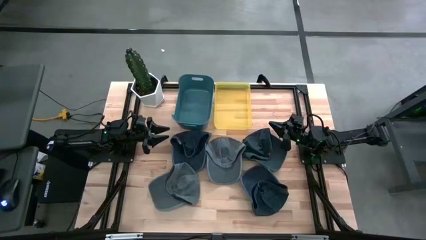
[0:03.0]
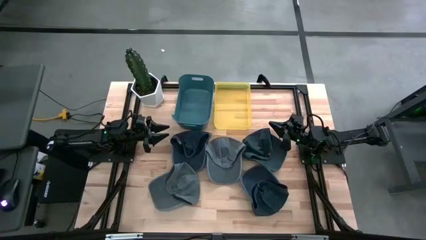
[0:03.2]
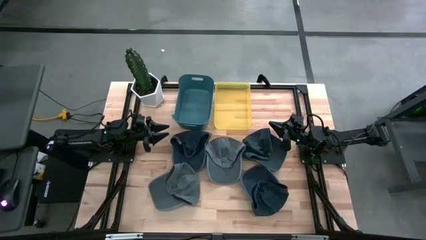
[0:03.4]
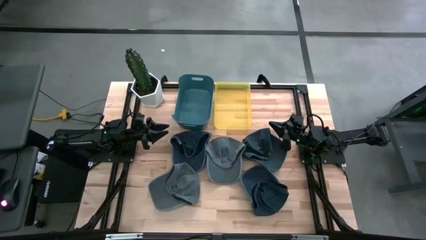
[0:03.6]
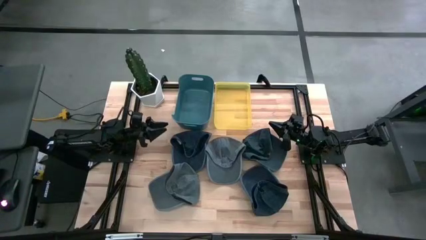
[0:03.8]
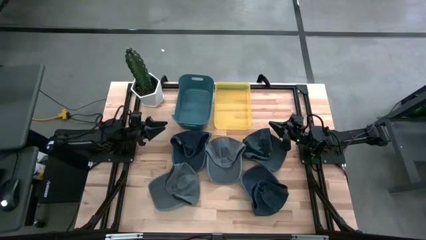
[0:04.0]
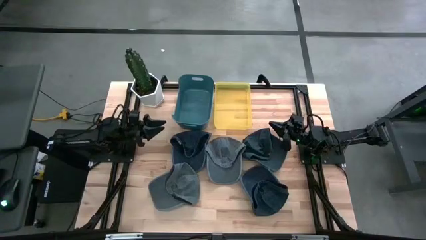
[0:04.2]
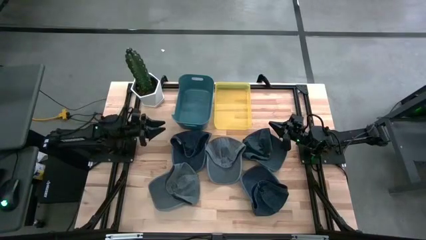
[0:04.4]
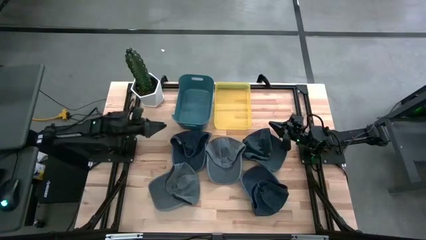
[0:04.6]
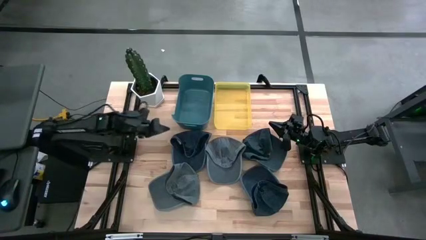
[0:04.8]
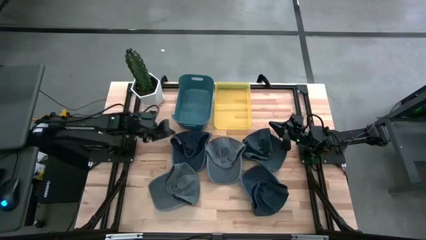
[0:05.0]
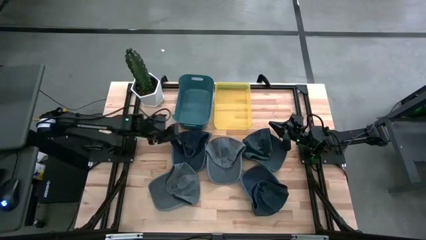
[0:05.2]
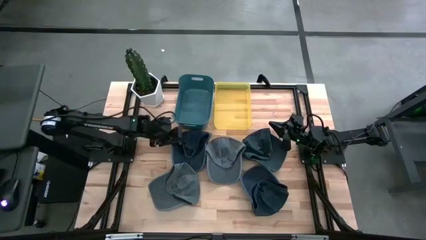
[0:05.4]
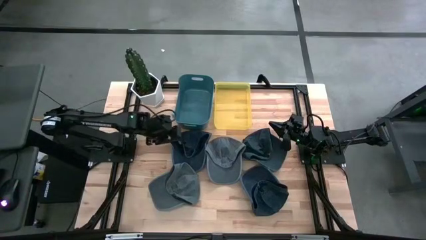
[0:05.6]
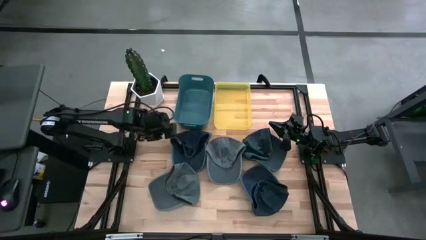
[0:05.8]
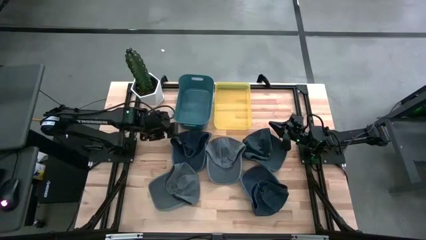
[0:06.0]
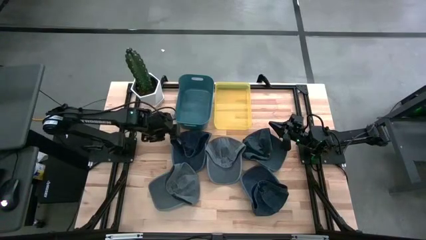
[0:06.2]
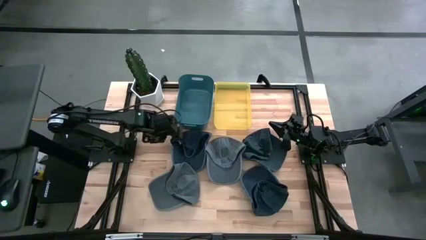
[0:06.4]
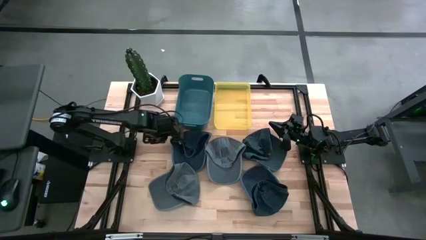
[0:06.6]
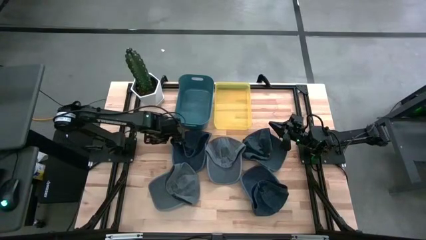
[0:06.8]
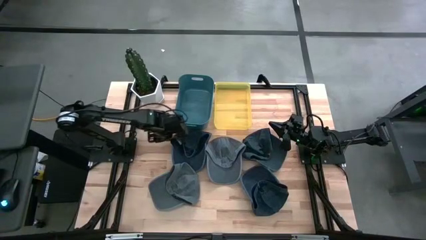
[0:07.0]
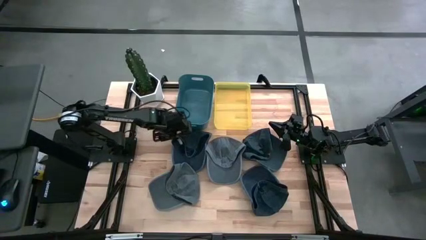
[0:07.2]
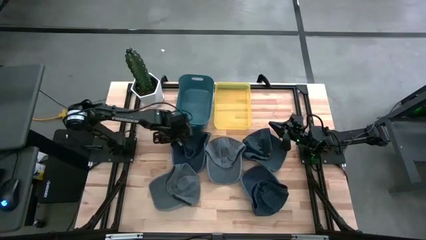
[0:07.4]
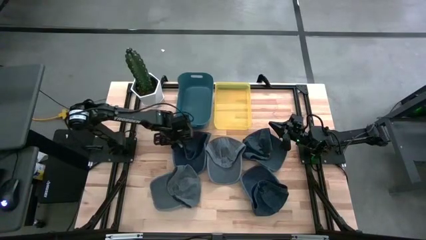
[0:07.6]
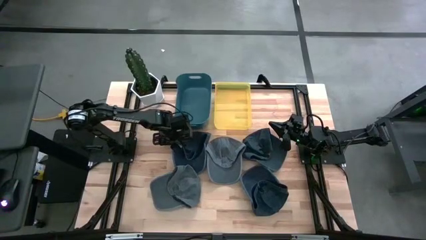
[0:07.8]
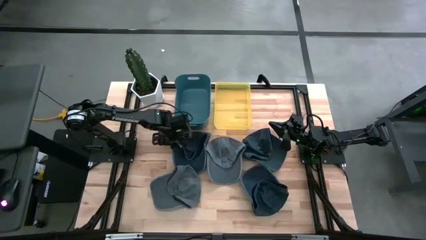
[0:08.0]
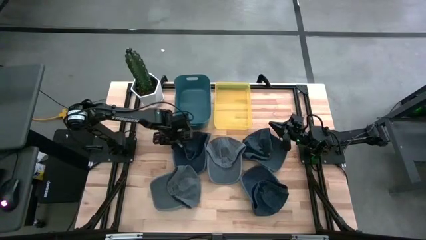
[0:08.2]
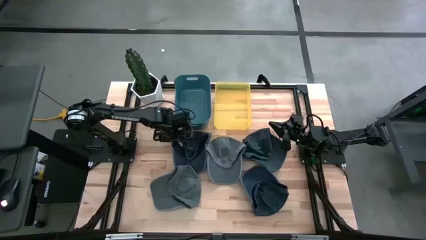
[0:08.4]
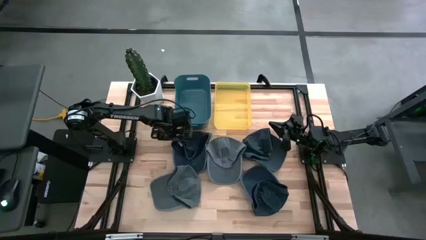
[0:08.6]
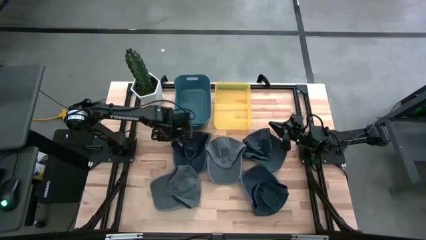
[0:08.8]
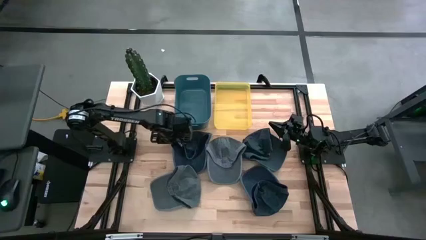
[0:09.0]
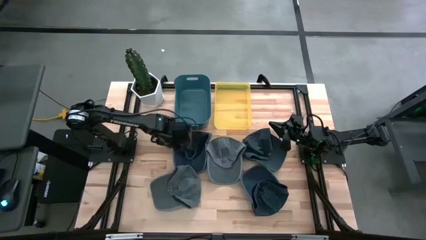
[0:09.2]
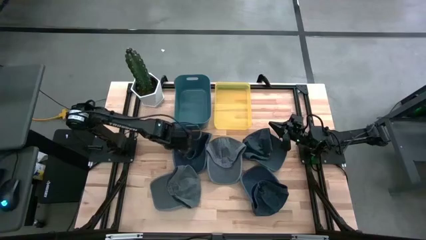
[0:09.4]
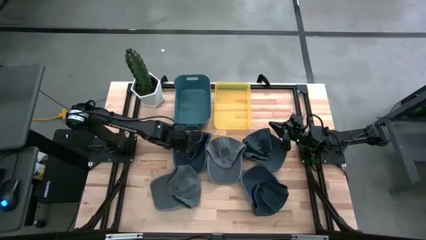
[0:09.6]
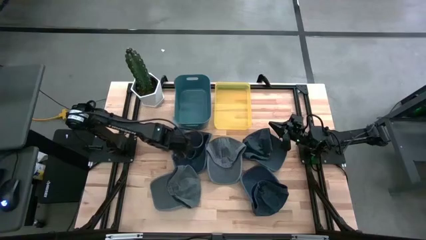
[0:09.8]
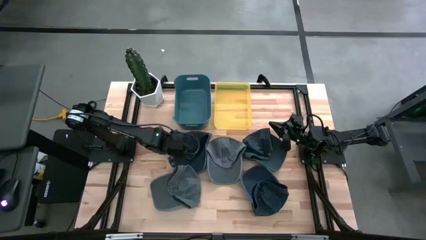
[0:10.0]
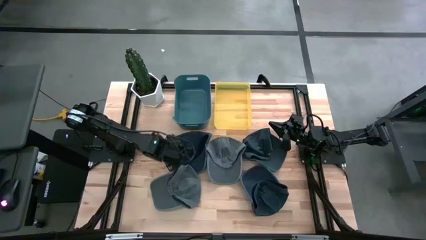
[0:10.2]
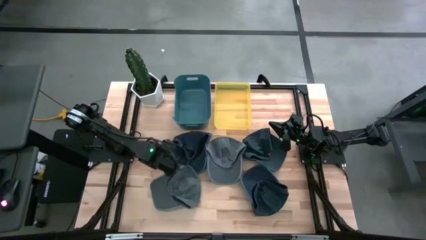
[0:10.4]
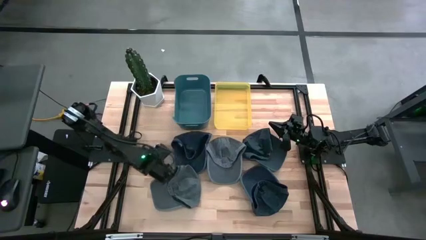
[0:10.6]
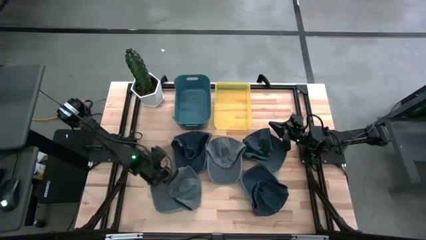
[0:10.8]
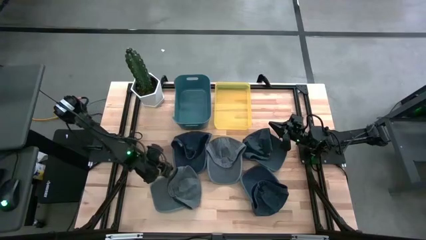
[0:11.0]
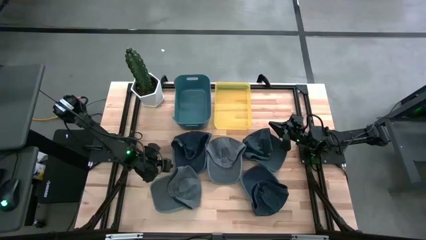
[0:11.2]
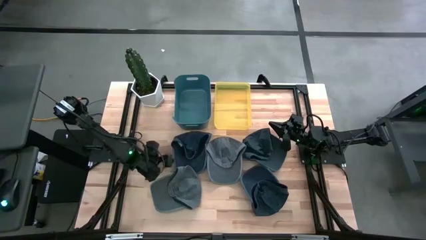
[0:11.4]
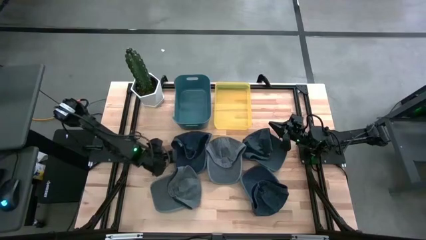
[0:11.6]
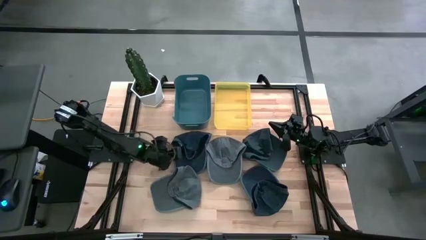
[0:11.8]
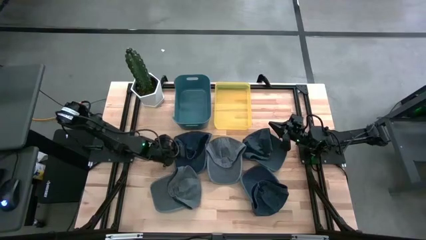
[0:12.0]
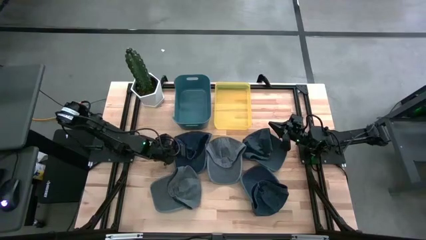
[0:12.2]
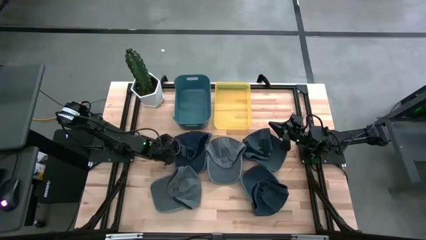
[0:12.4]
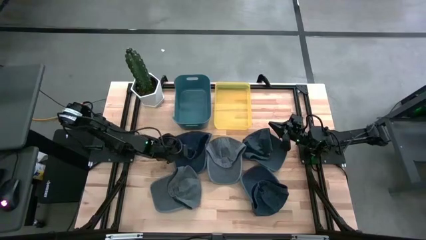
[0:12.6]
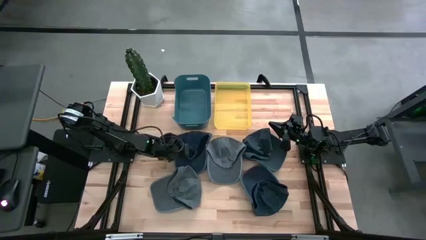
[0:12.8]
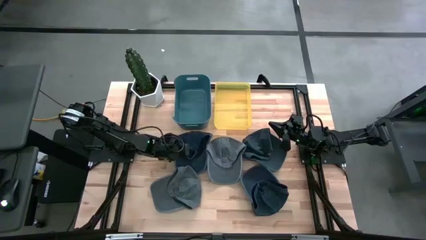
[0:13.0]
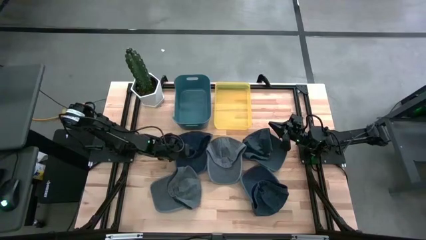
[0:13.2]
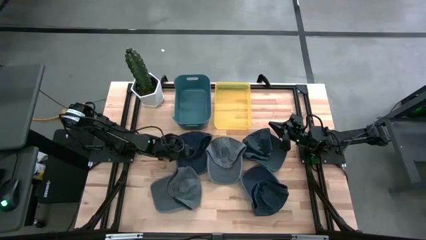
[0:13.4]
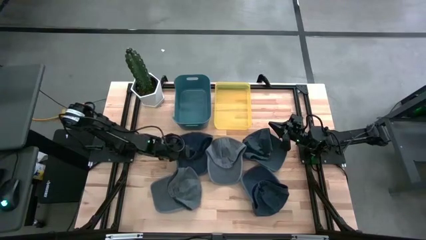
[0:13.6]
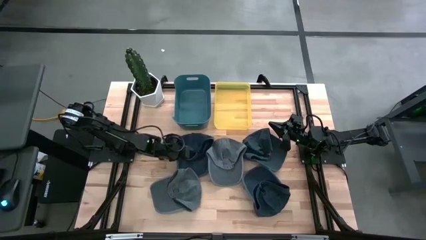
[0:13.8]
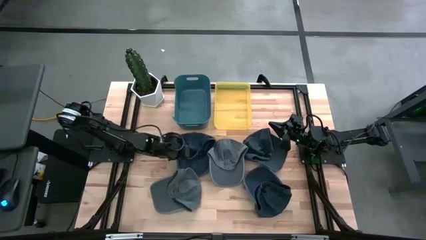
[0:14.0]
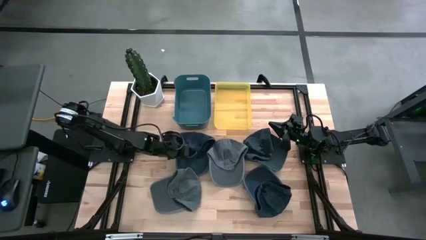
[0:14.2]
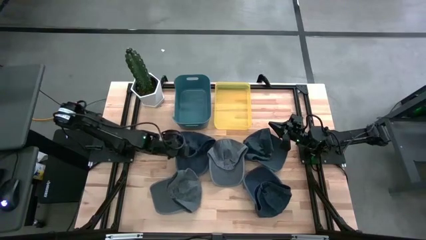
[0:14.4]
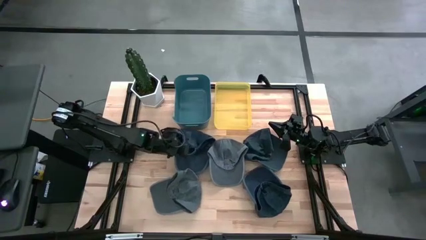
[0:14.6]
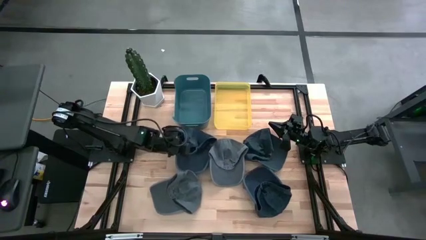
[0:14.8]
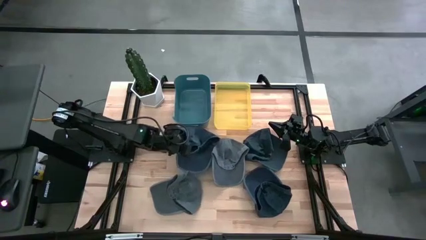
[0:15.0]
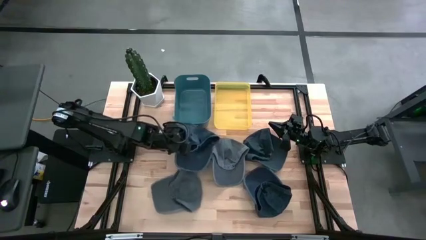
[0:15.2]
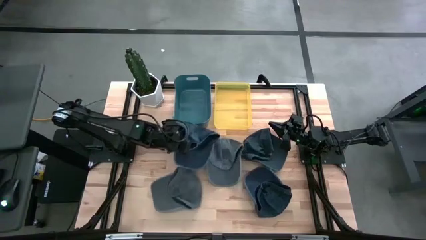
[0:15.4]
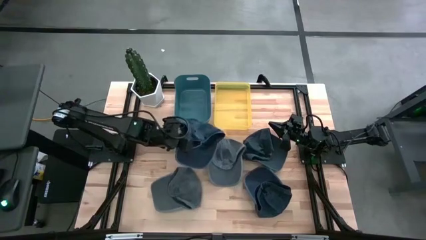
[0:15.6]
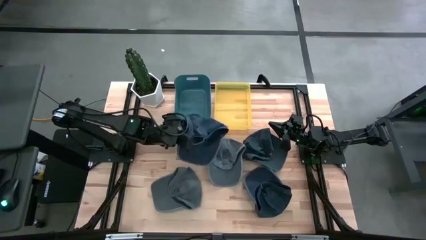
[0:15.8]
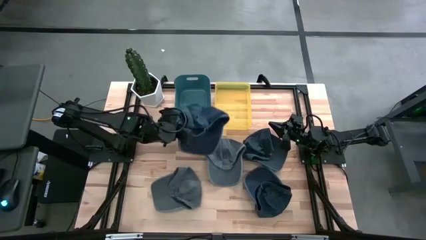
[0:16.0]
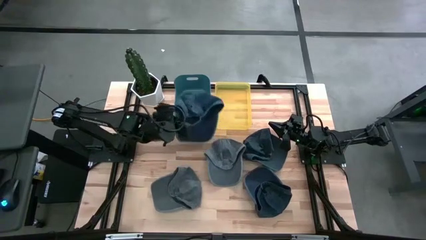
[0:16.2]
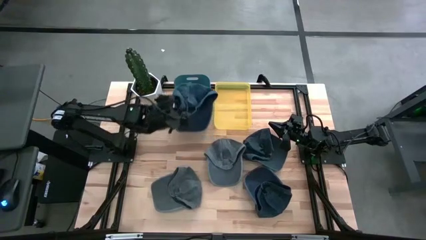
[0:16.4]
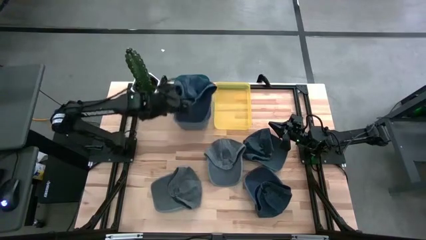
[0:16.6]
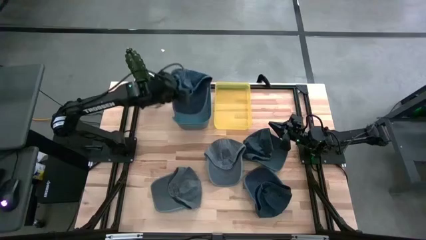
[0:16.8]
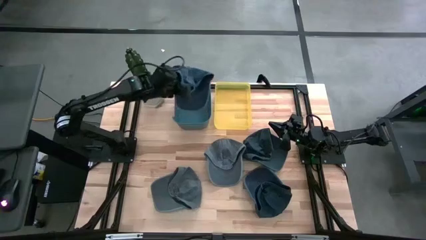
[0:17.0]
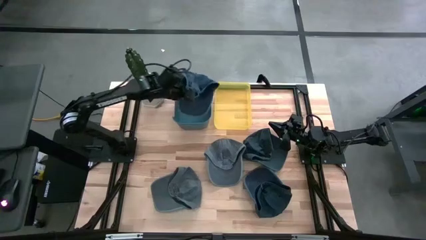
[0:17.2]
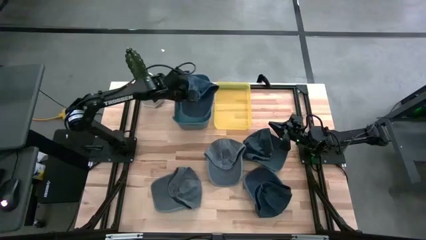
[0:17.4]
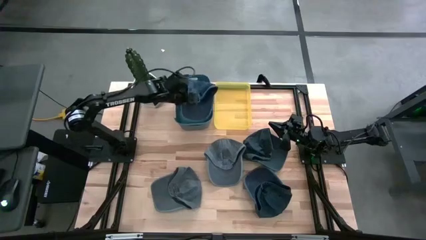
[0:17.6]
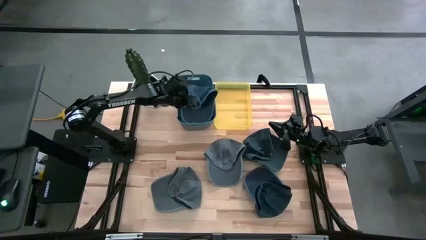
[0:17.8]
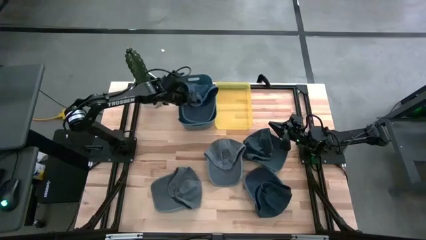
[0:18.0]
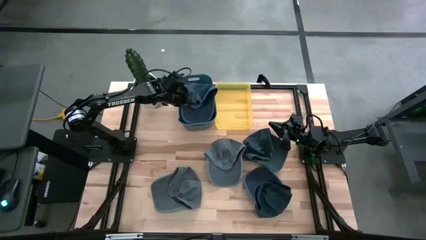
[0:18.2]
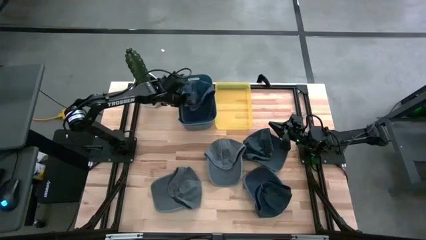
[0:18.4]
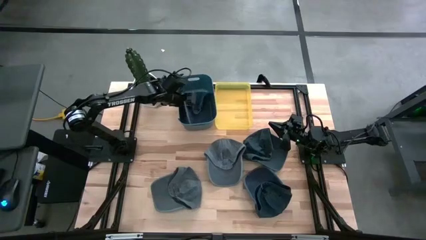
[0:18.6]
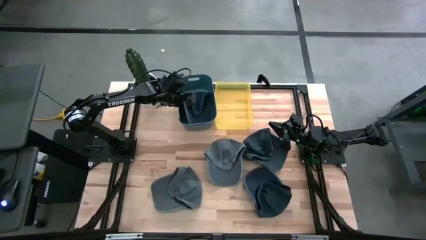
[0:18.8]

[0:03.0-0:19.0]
Task: Pick & Place hat
Put the top left blue cap into the blue bin
